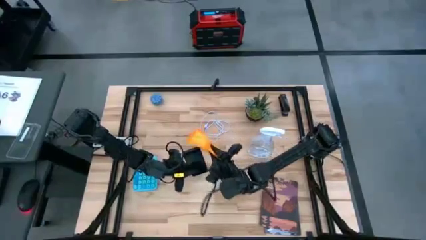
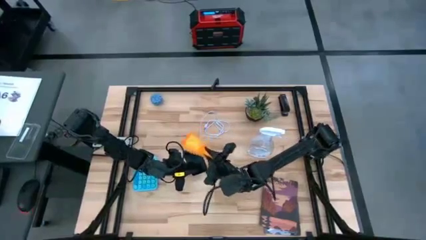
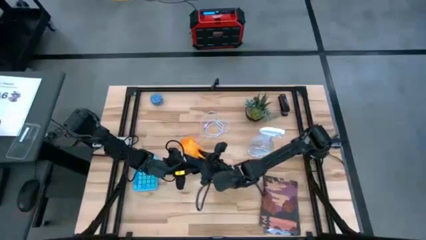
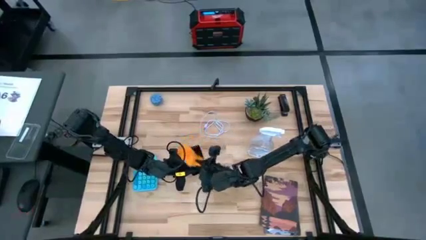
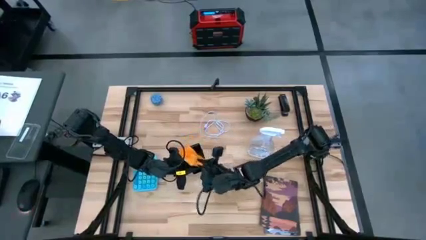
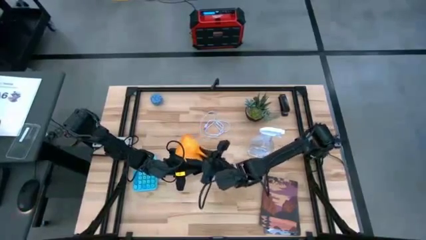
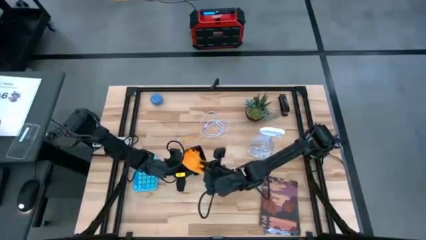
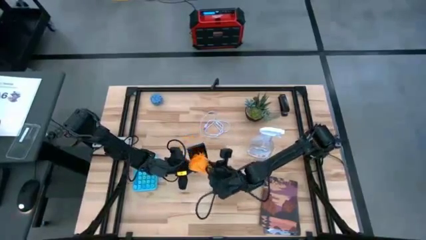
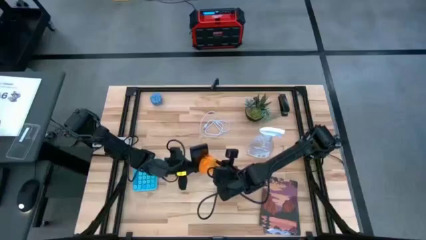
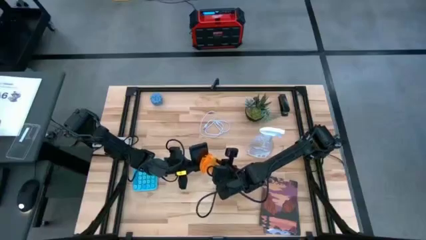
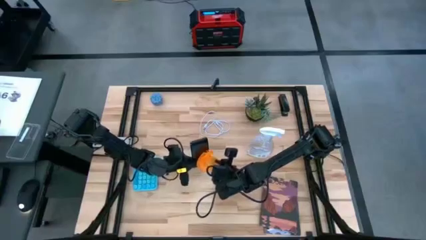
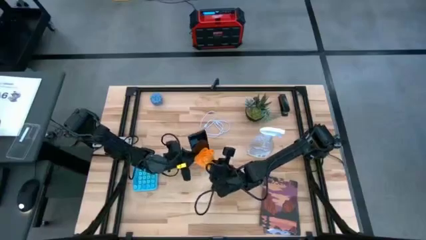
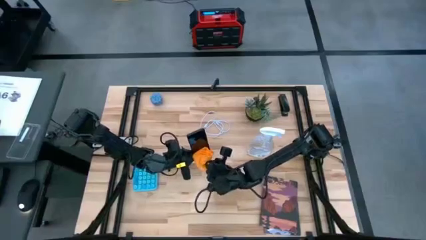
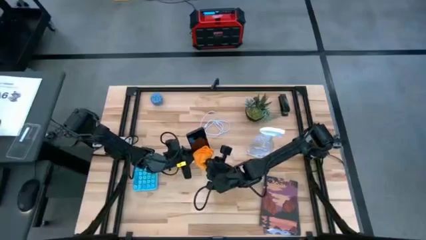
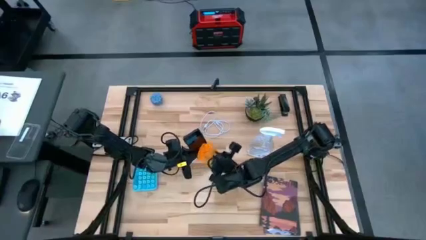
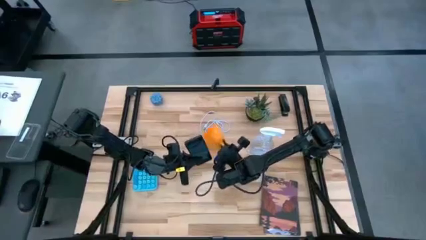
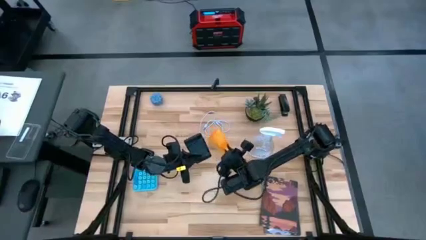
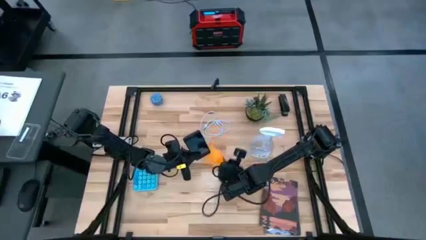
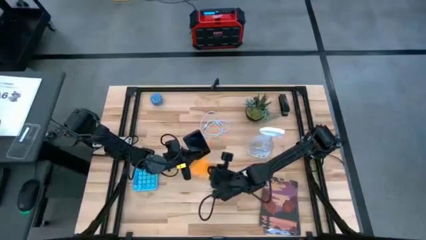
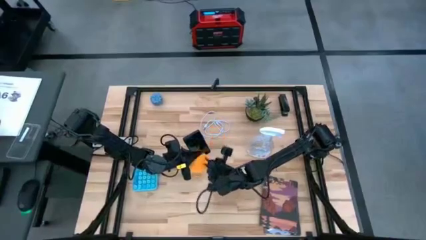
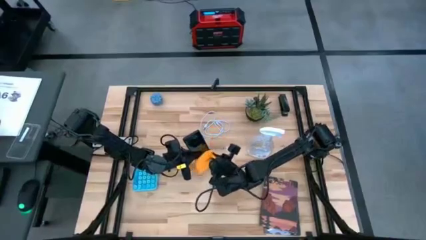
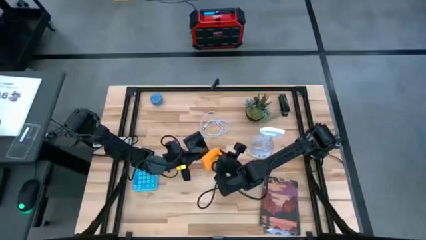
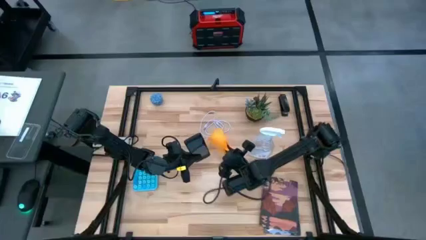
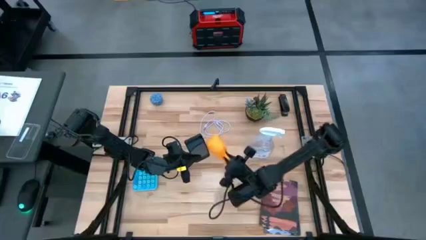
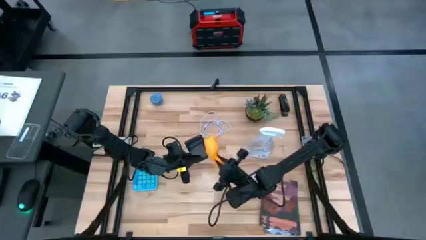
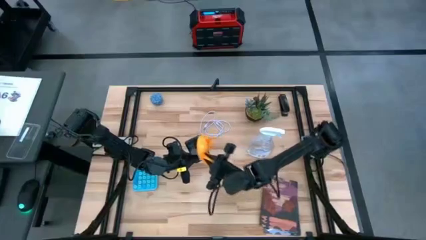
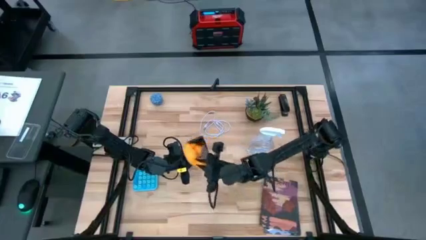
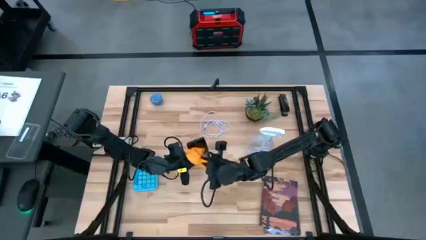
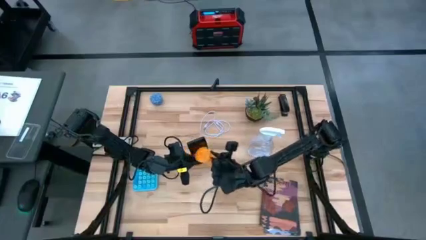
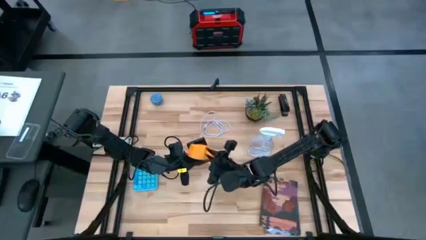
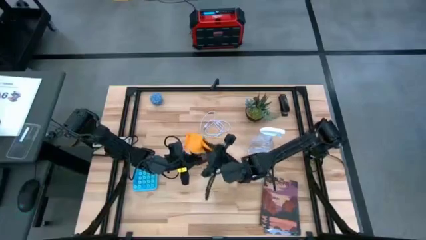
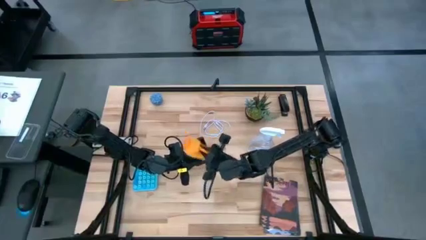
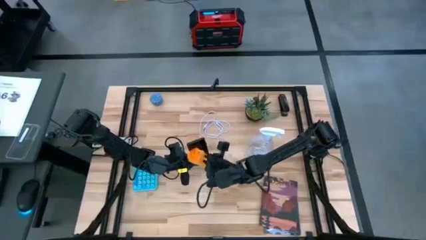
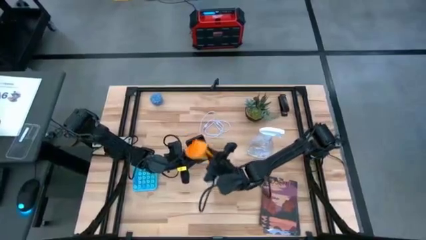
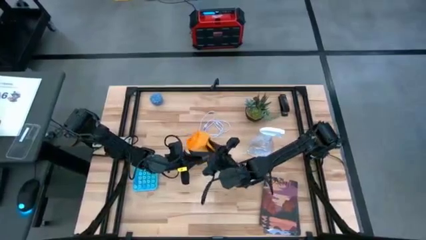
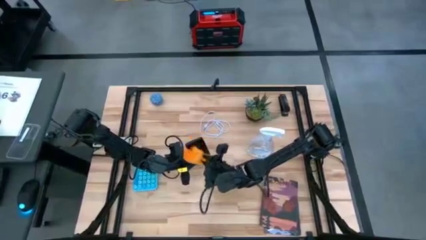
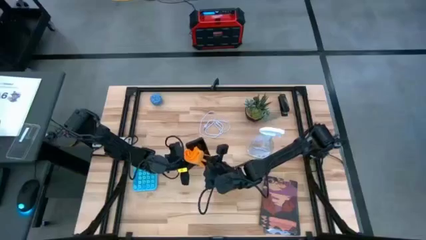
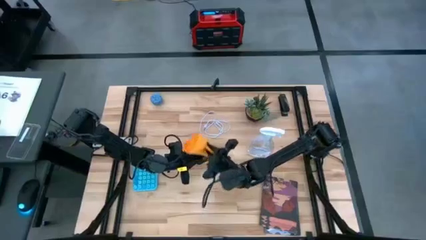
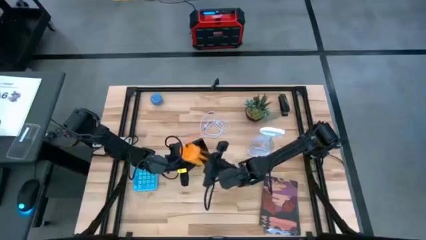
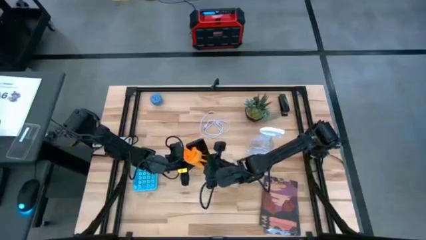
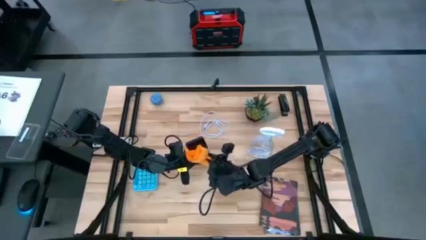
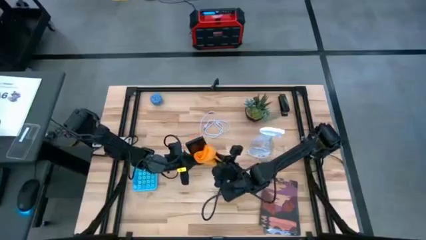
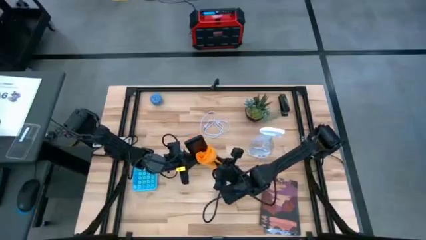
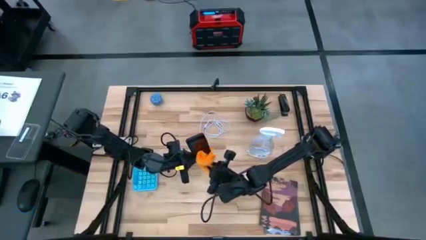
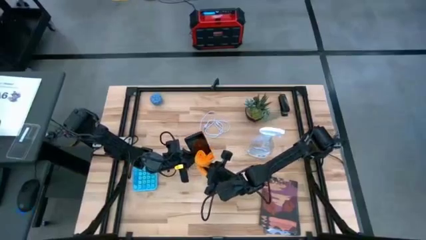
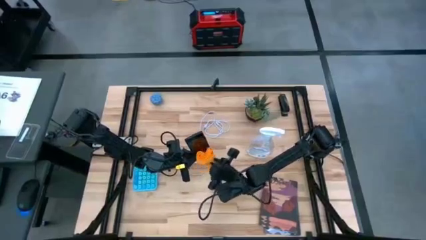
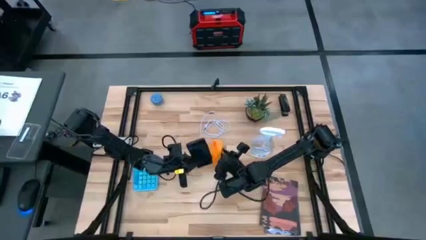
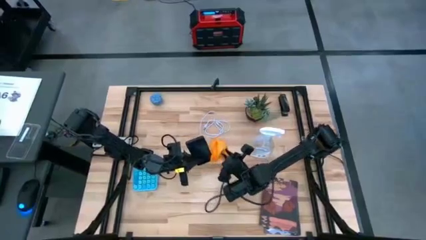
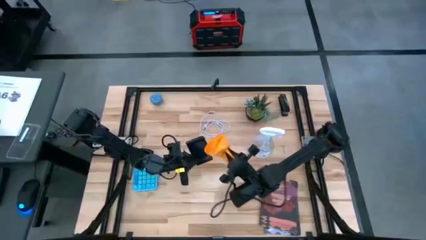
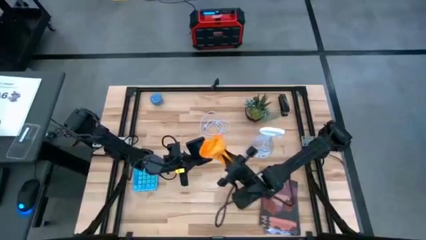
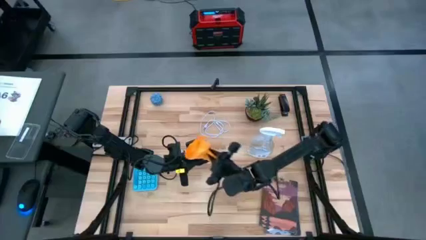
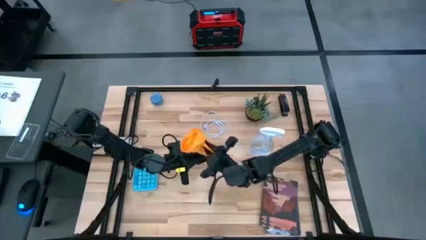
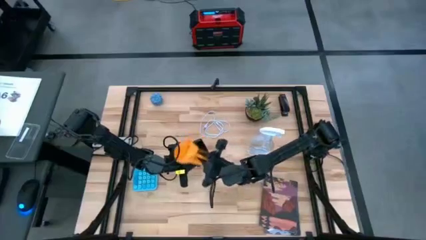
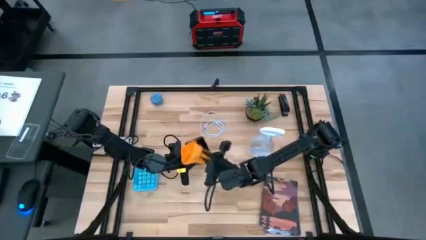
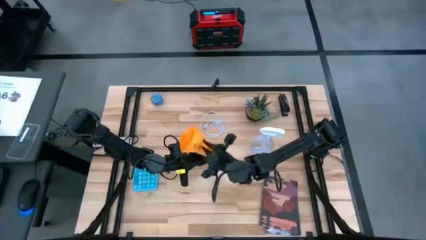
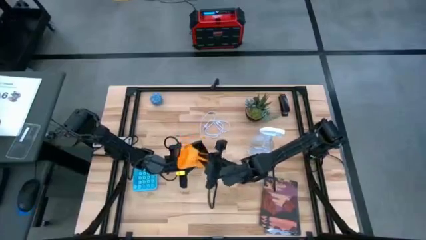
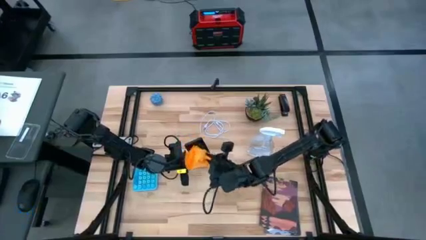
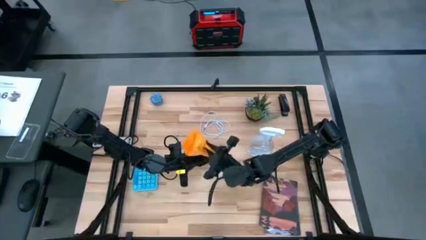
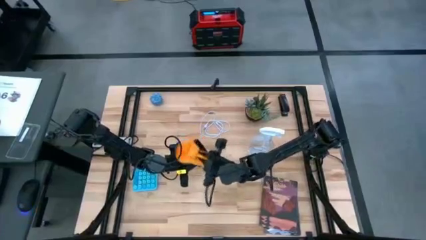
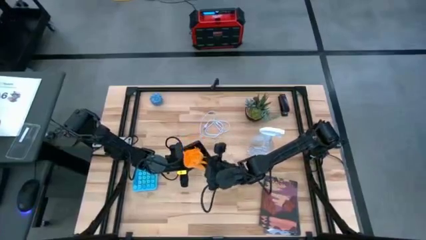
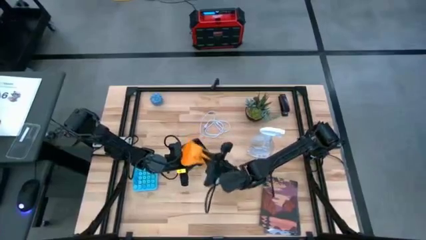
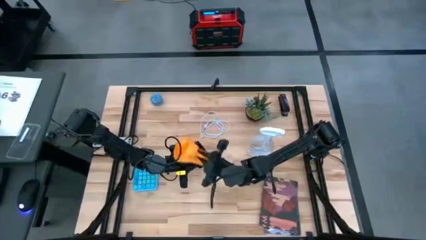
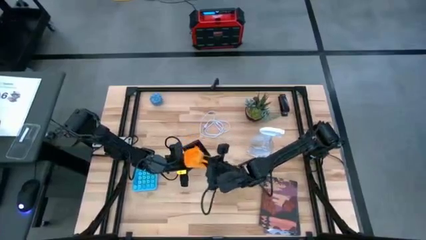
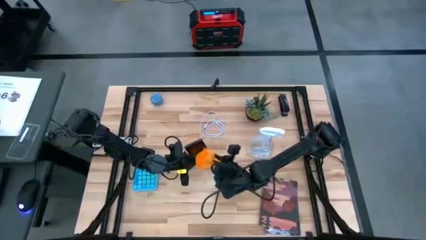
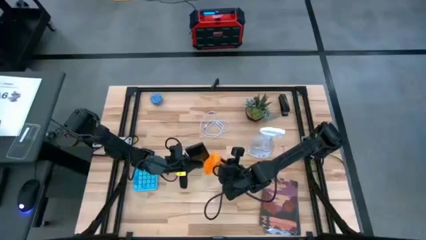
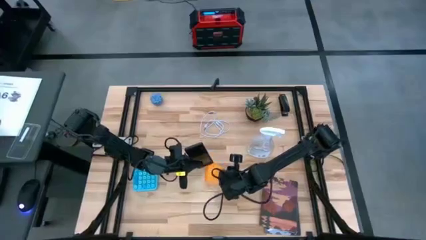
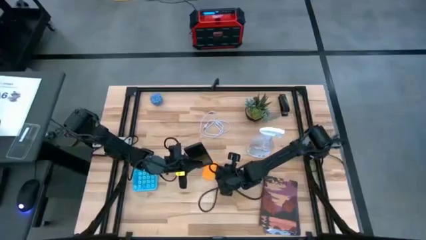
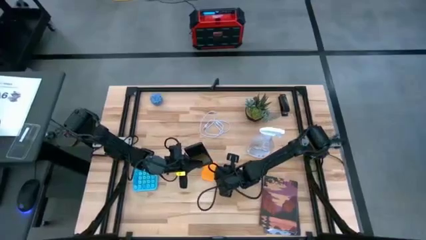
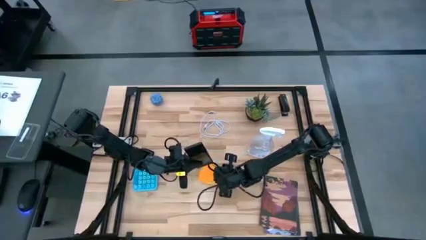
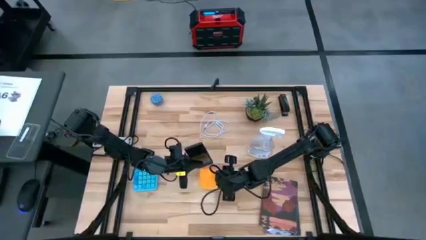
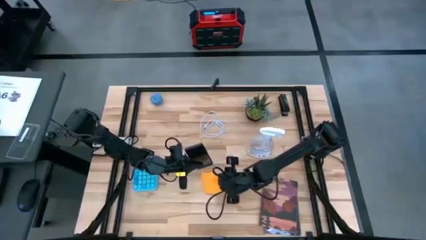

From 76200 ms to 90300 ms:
Task: Apply microfiber cloth
Wipe the black cellphone using microfiber cloth

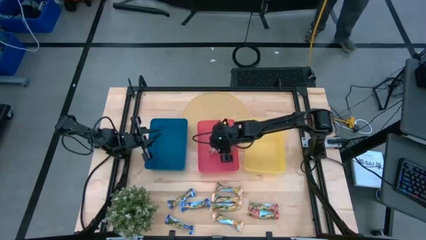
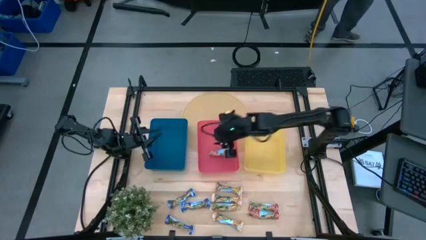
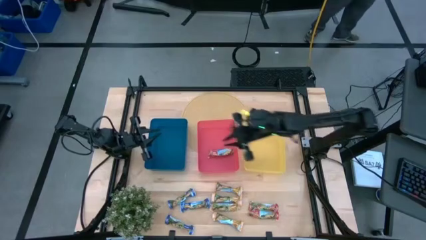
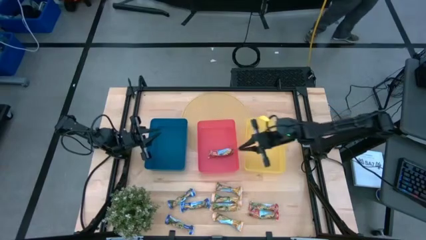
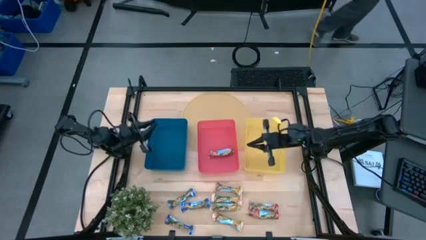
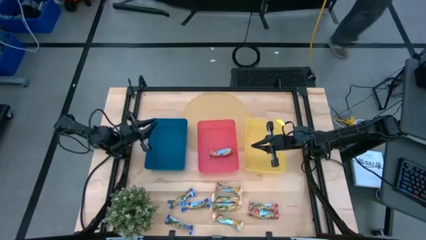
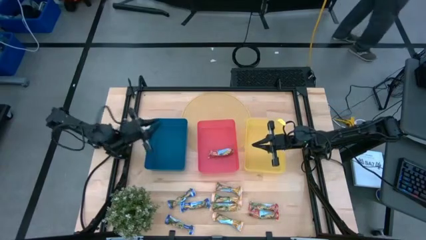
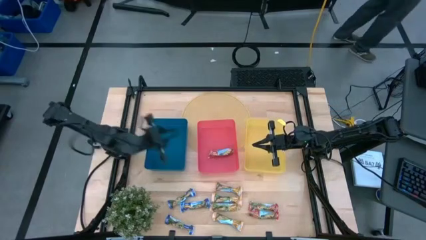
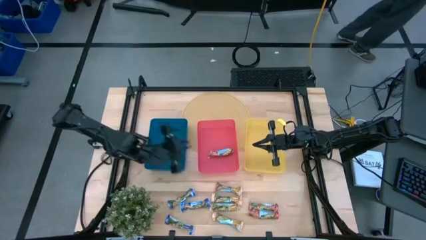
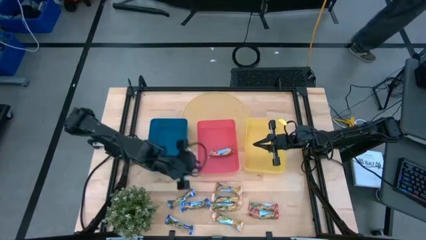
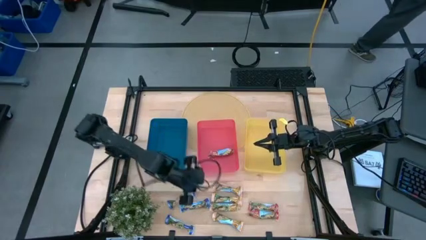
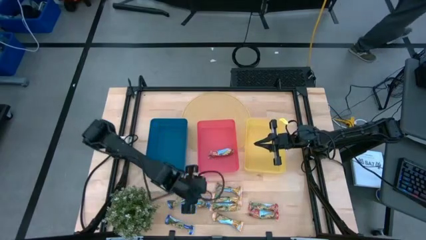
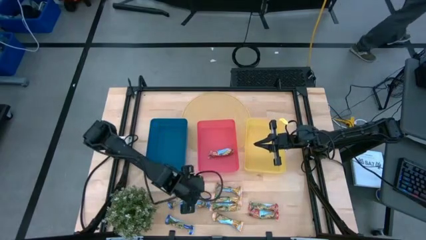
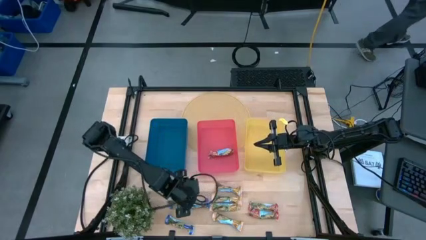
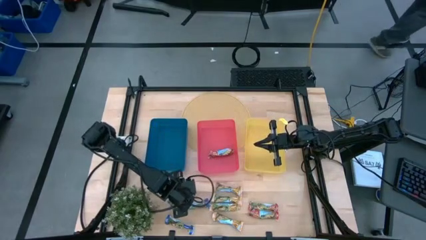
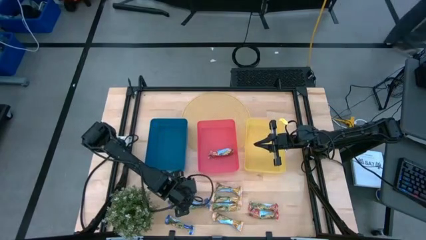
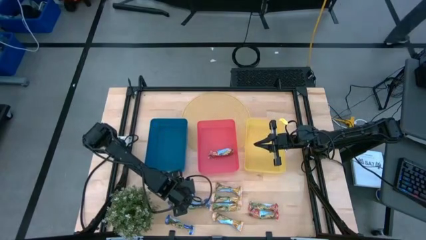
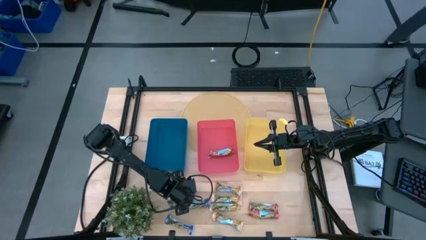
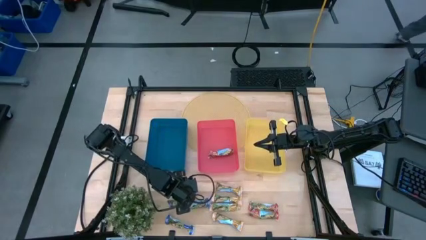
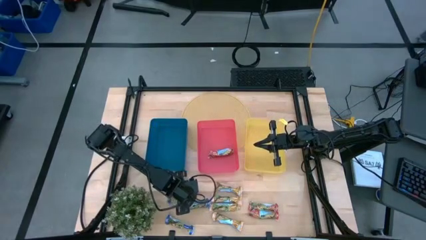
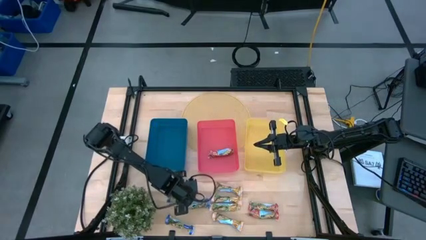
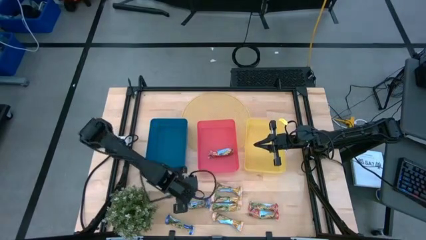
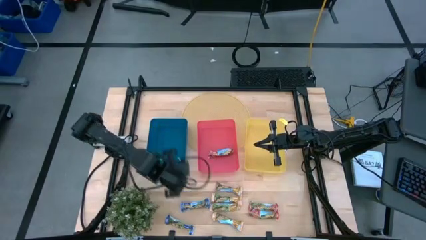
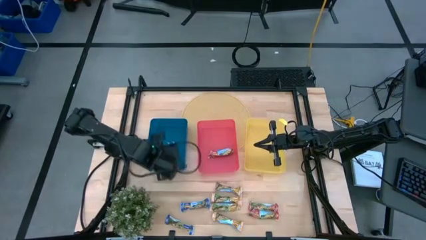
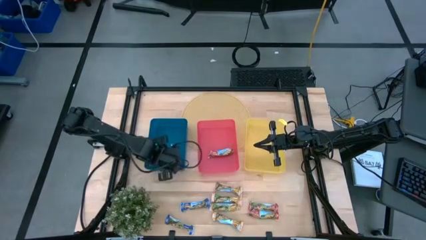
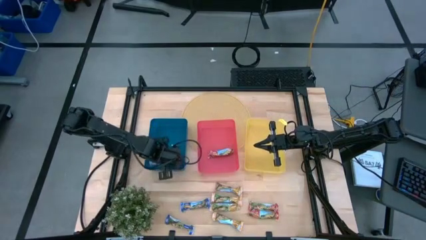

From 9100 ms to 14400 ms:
Task: Pick and place Granola Bars by type
Put the blue granola bar into the blue bin
